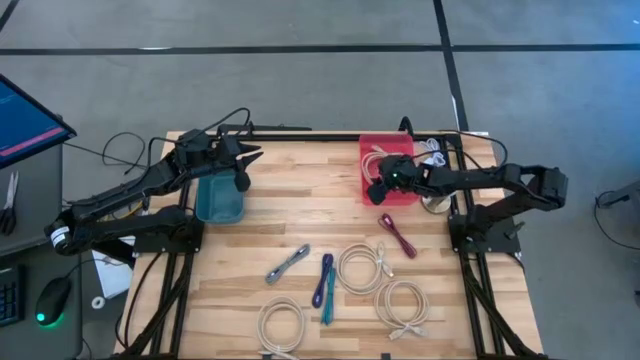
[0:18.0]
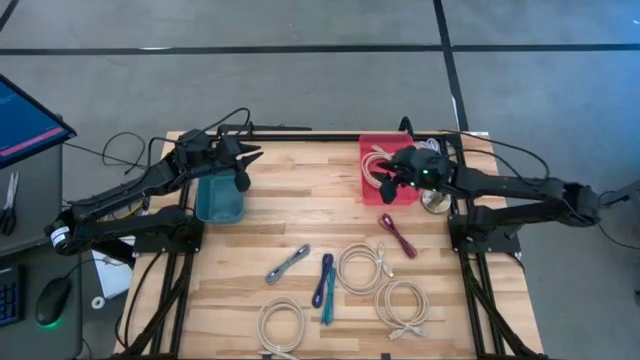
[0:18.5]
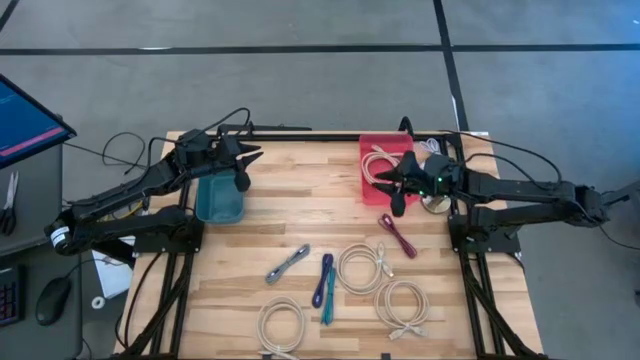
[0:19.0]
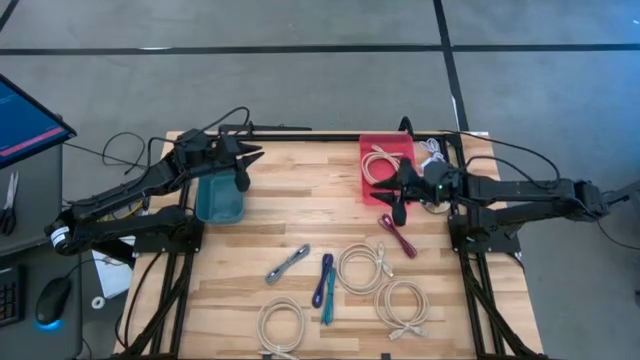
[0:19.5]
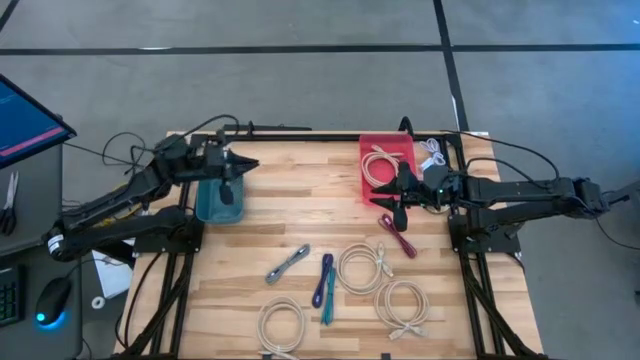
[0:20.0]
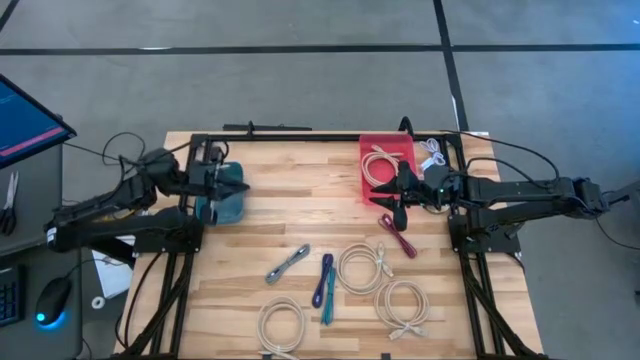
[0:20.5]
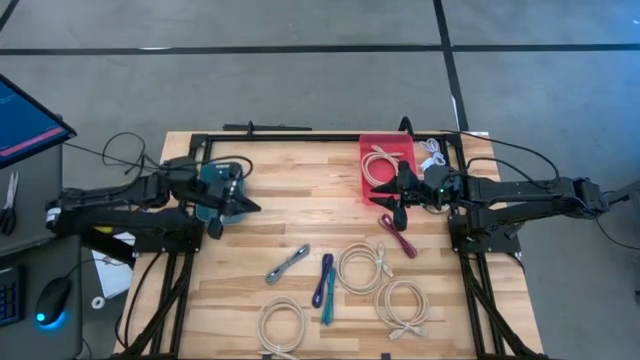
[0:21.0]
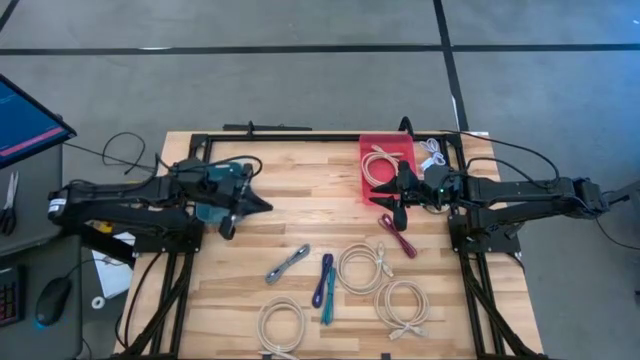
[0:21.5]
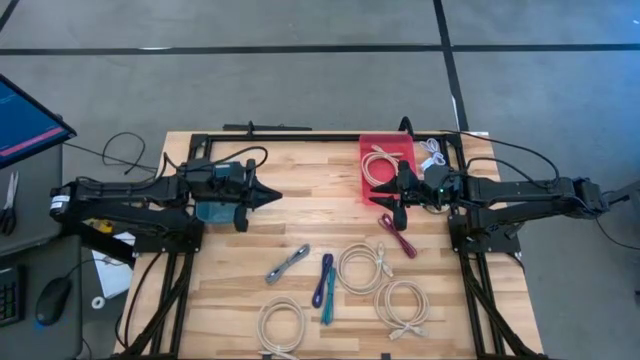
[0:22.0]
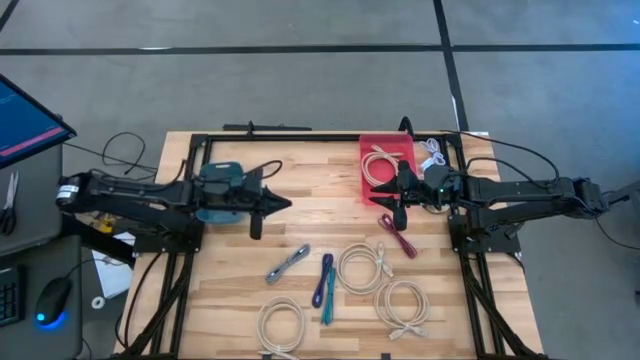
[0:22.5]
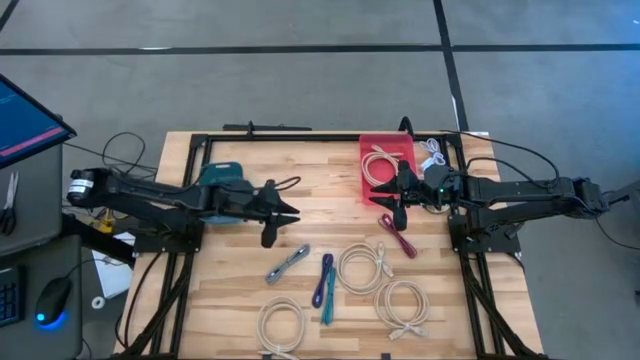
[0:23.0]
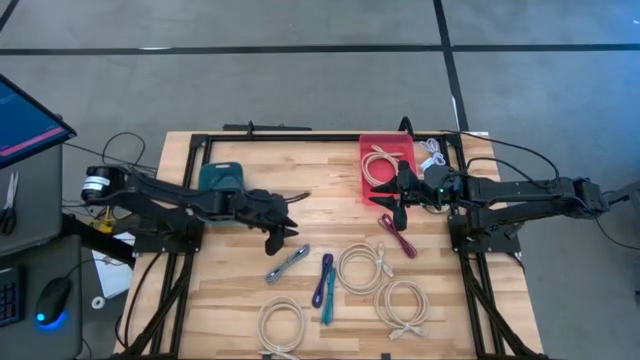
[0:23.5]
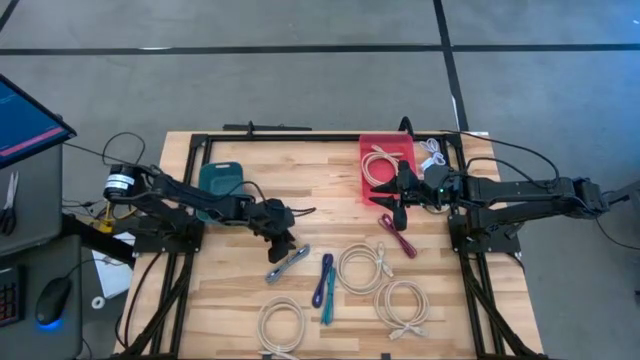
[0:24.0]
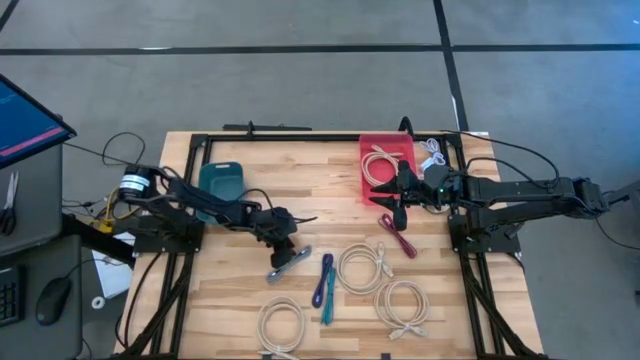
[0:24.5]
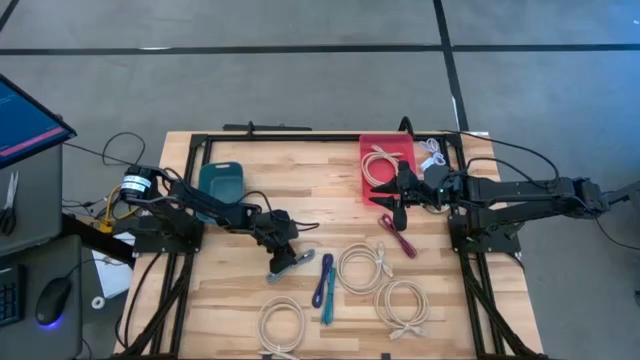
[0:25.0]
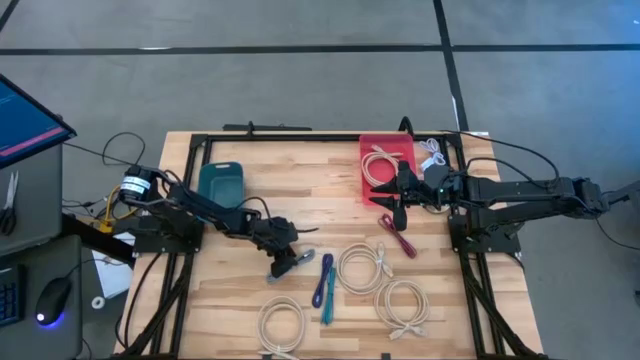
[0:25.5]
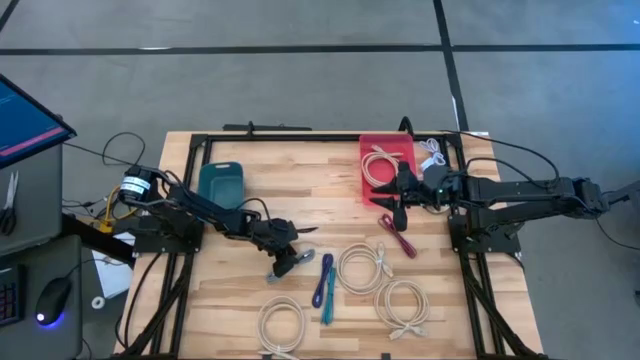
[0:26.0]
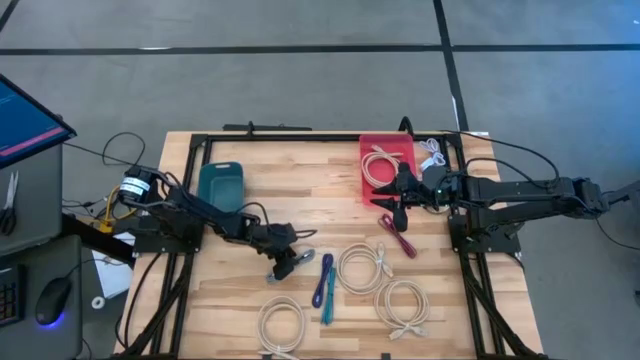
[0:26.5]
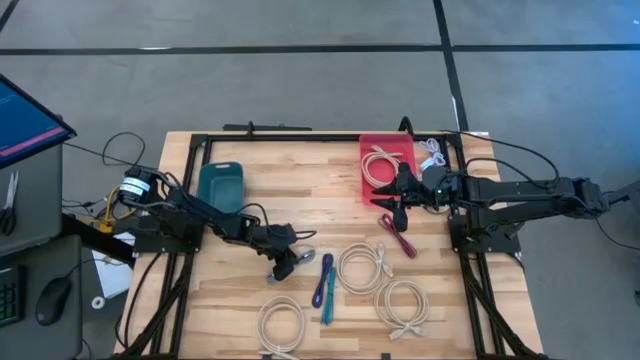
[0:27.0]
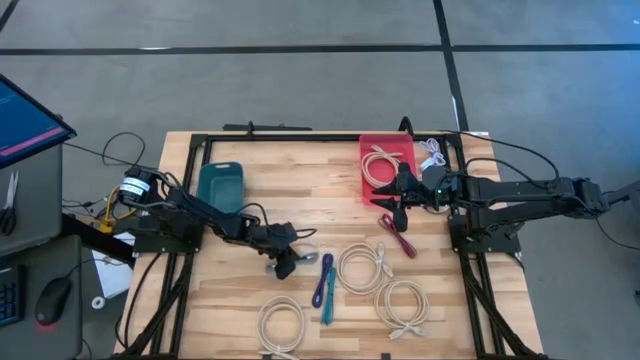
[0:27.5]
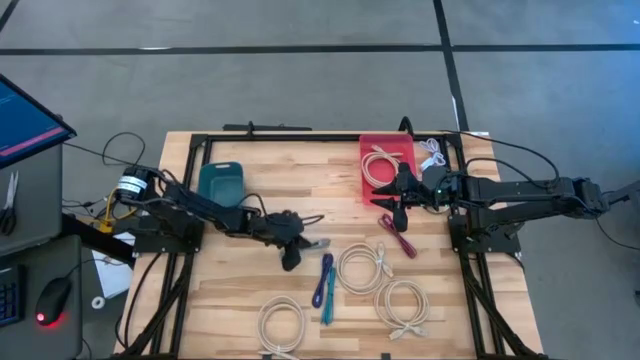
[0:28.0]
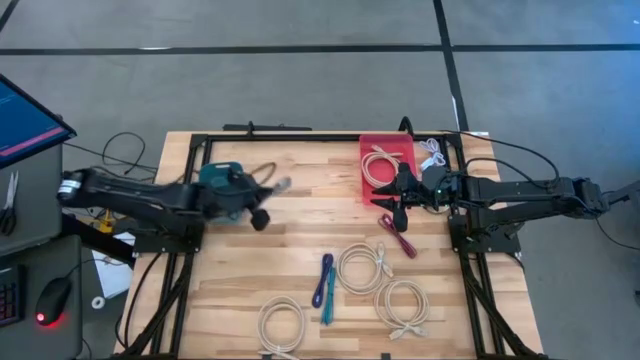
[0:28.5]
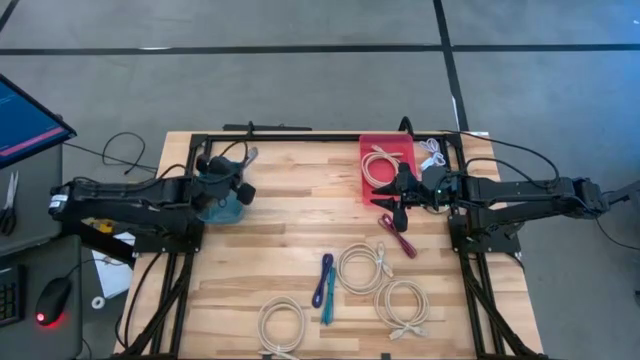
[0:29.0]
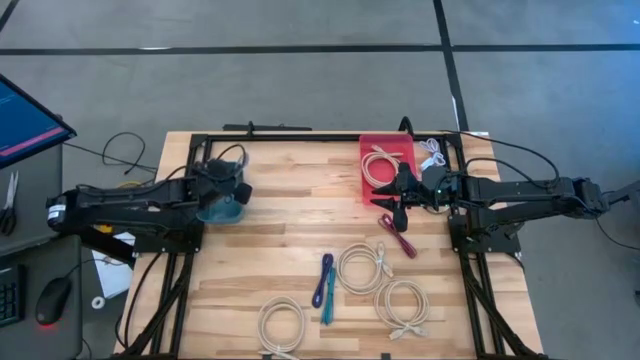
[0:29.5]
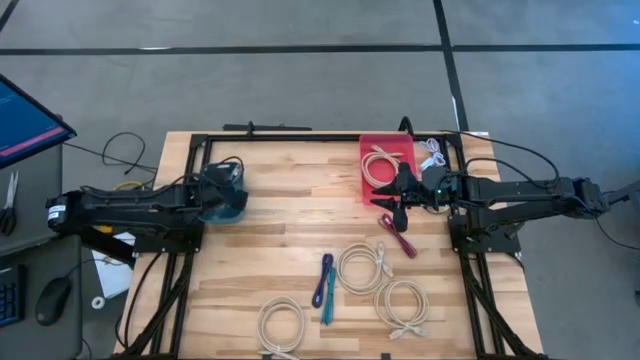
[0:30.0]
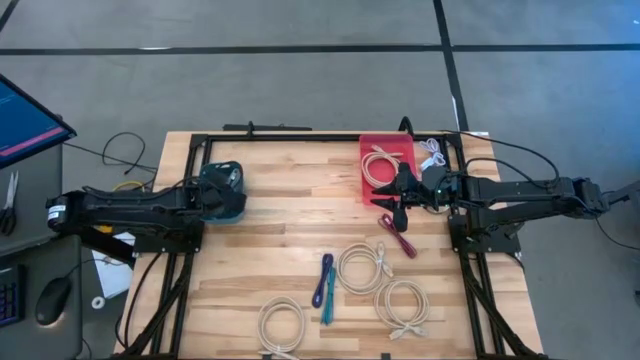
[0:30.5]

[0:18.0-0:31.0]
Task: Pick & Place USB Port
Put the gray charger cable in the blue bin
